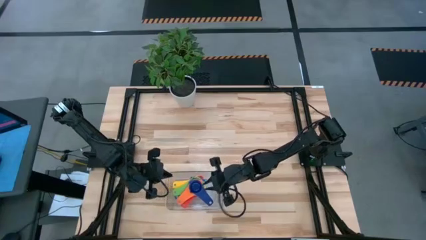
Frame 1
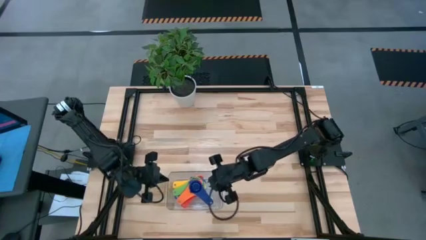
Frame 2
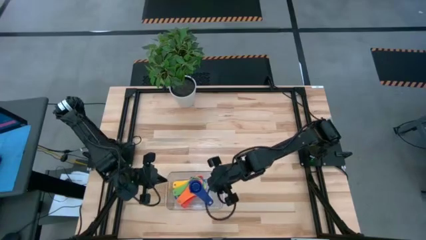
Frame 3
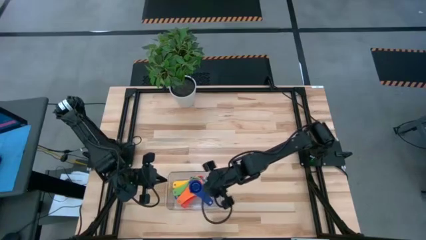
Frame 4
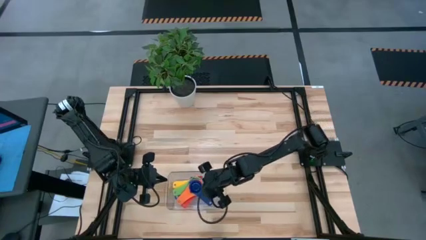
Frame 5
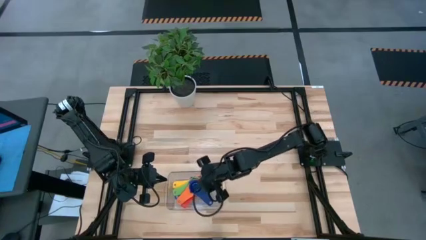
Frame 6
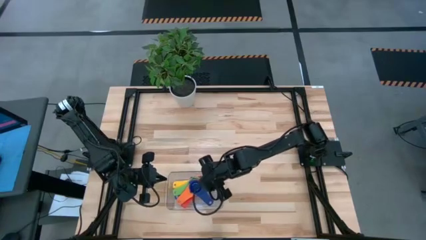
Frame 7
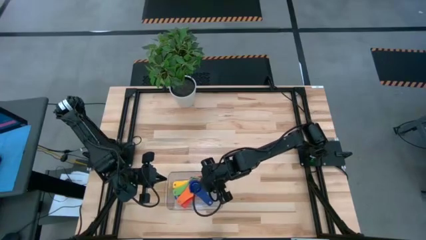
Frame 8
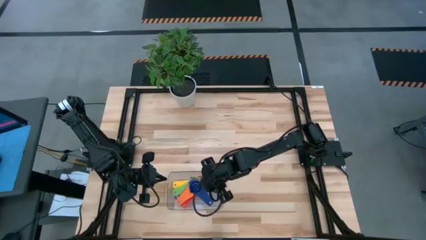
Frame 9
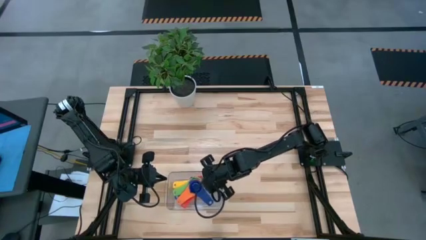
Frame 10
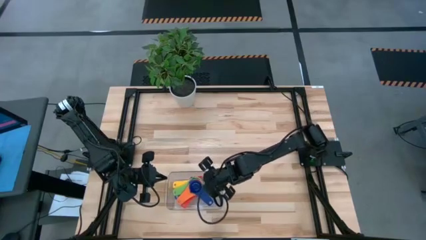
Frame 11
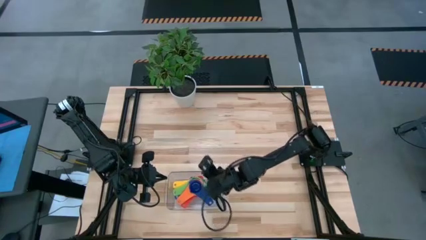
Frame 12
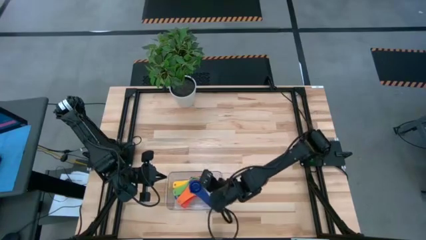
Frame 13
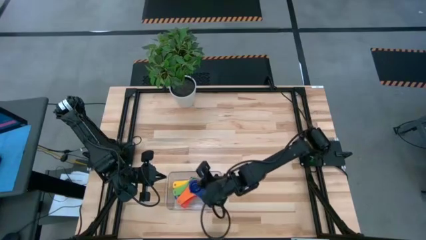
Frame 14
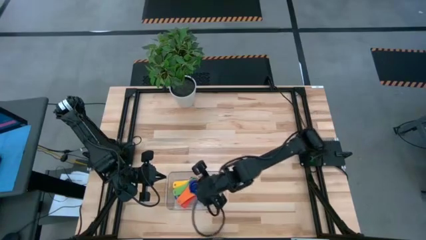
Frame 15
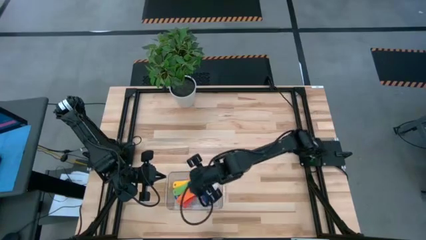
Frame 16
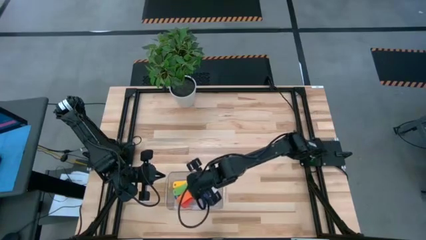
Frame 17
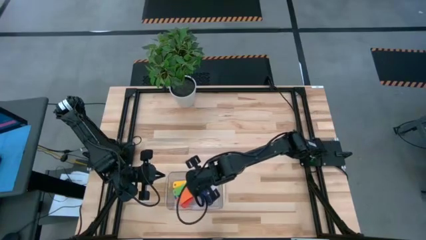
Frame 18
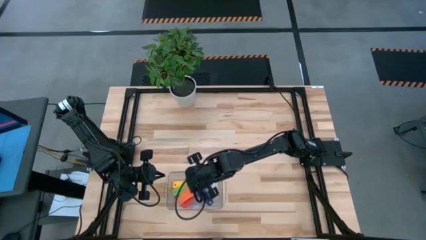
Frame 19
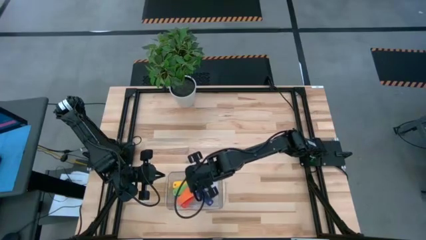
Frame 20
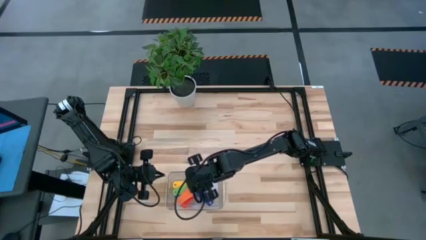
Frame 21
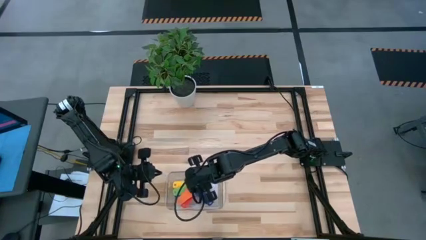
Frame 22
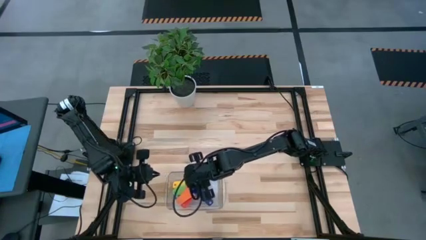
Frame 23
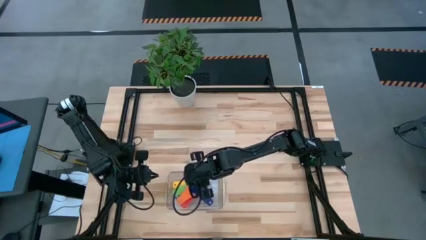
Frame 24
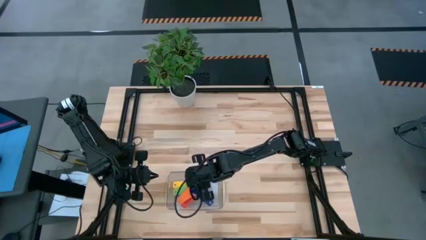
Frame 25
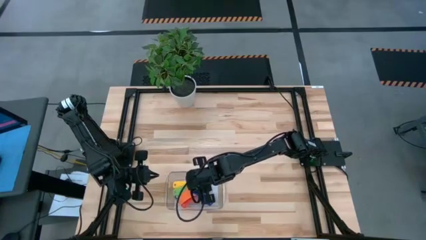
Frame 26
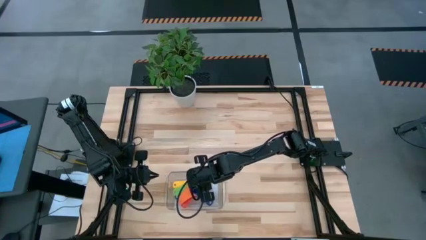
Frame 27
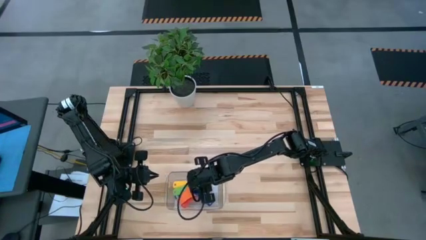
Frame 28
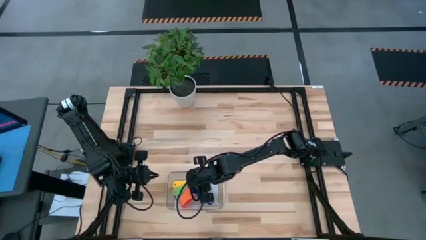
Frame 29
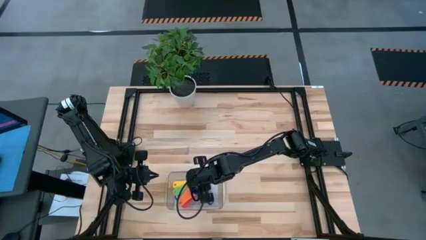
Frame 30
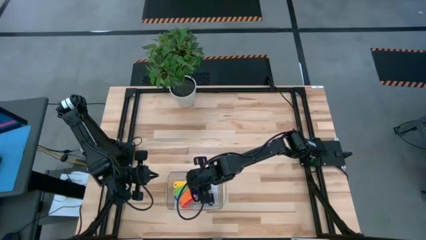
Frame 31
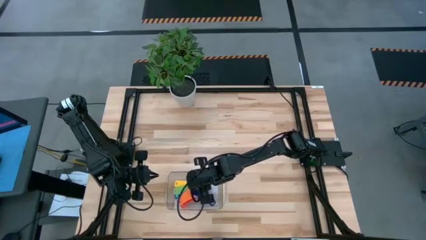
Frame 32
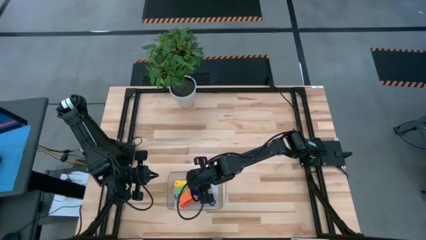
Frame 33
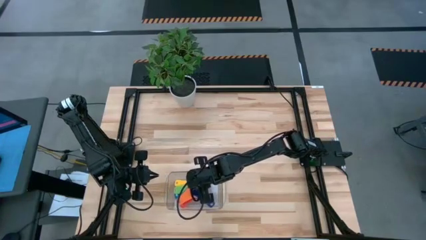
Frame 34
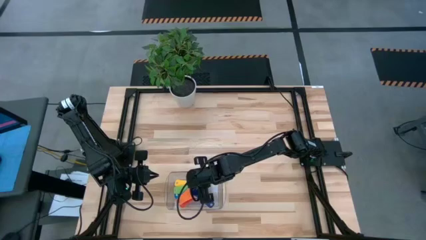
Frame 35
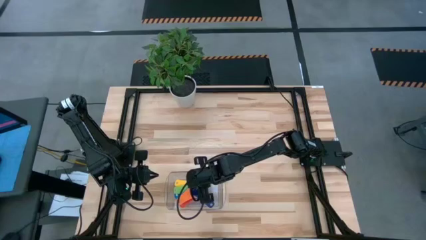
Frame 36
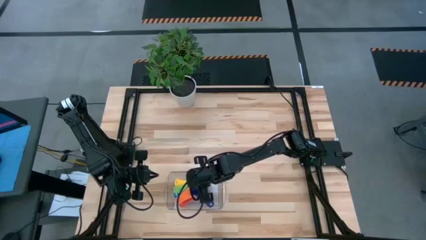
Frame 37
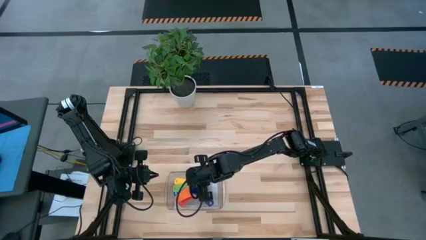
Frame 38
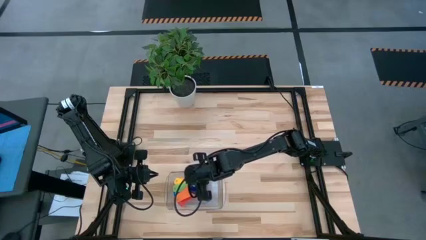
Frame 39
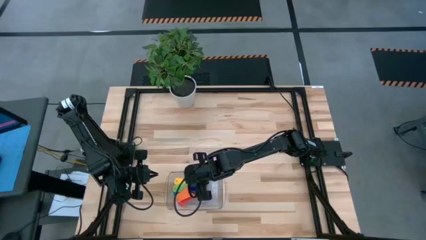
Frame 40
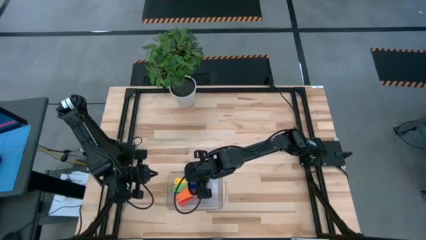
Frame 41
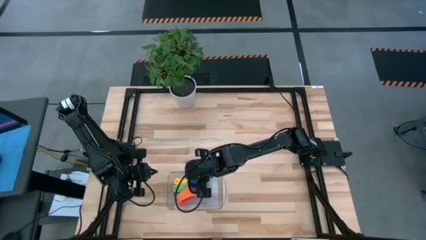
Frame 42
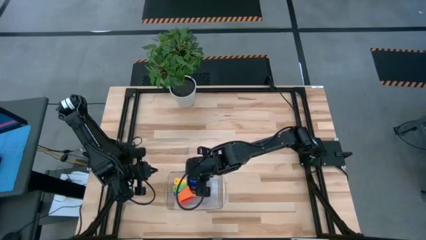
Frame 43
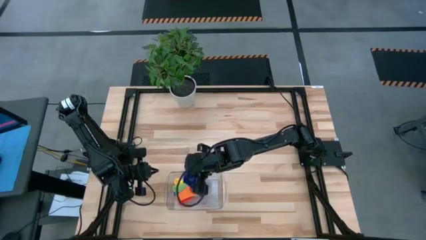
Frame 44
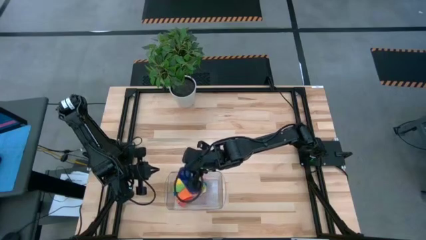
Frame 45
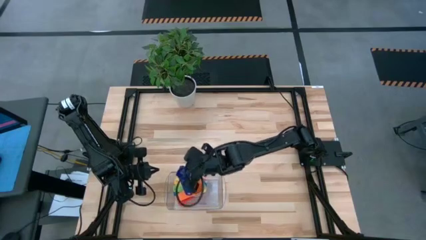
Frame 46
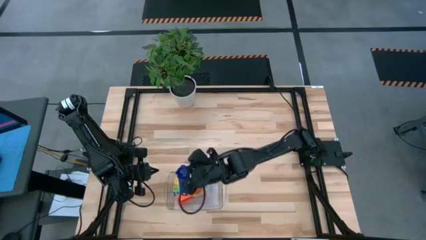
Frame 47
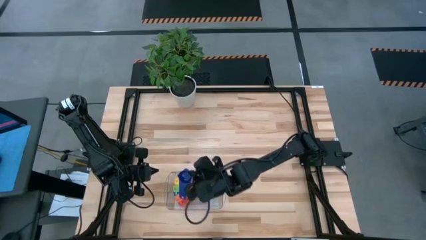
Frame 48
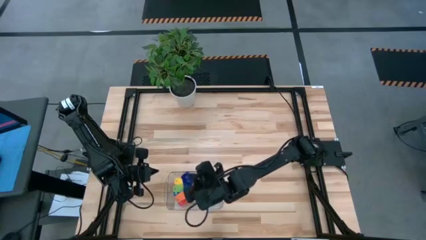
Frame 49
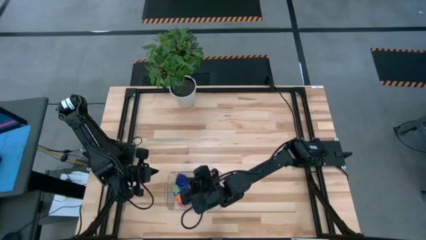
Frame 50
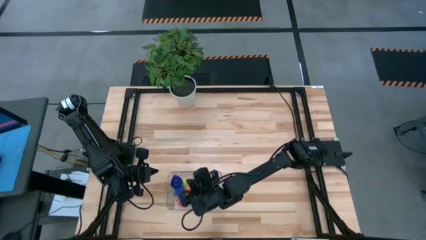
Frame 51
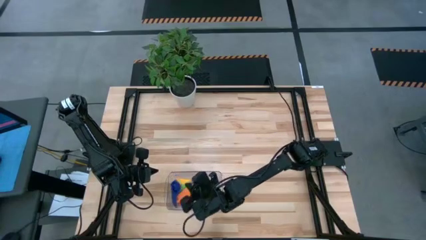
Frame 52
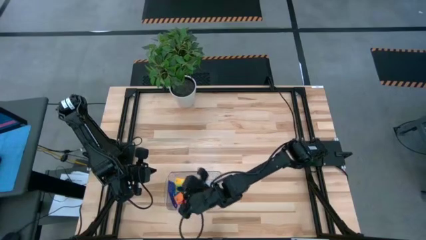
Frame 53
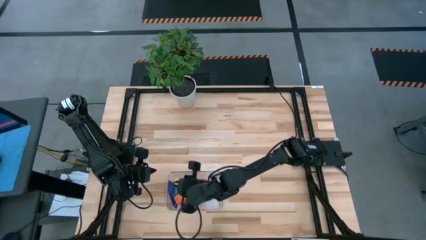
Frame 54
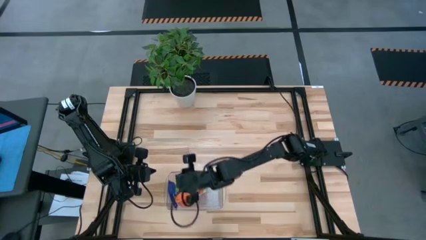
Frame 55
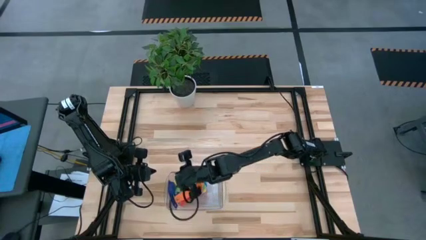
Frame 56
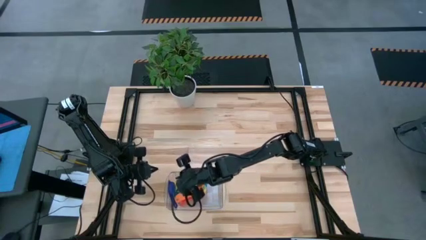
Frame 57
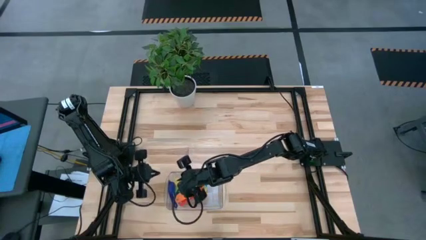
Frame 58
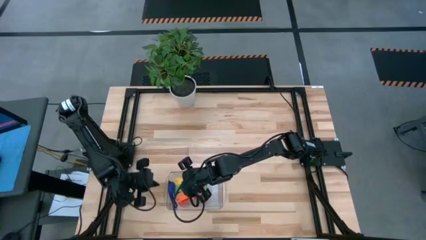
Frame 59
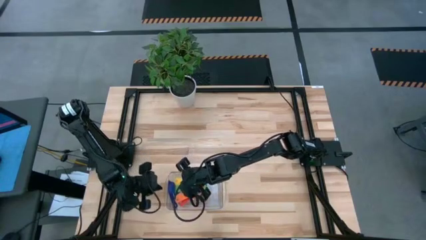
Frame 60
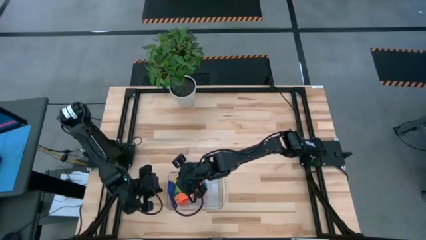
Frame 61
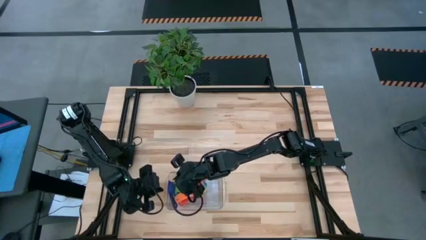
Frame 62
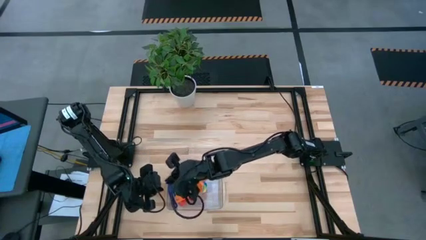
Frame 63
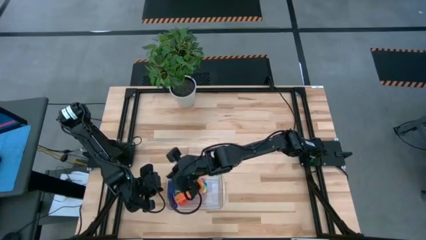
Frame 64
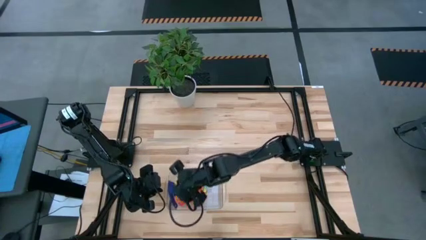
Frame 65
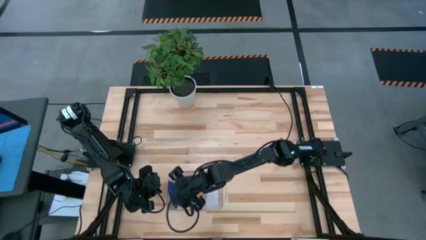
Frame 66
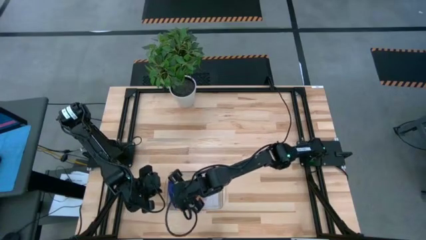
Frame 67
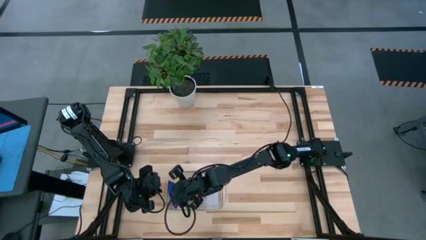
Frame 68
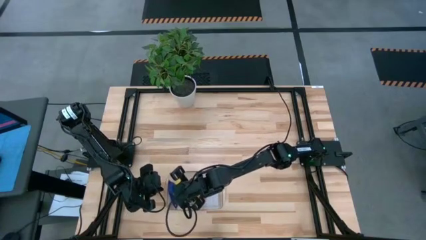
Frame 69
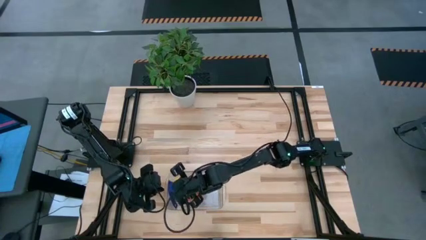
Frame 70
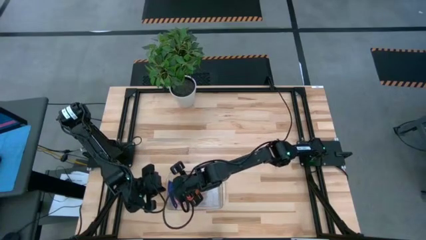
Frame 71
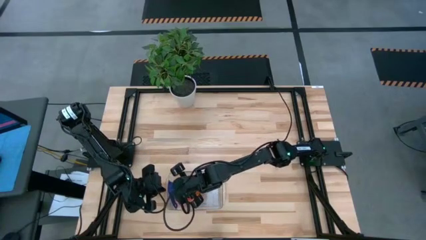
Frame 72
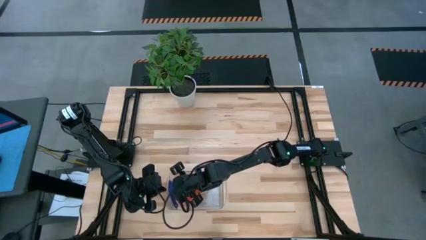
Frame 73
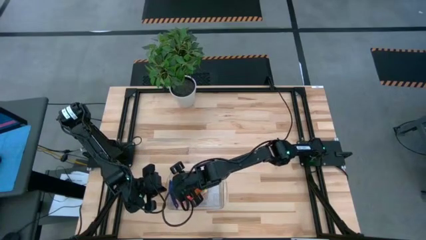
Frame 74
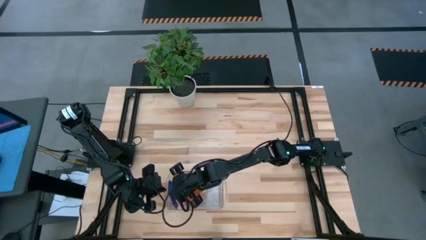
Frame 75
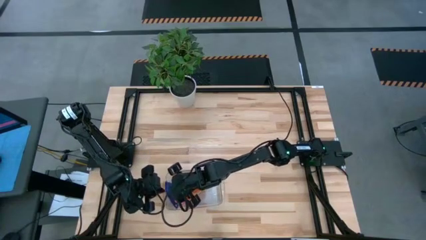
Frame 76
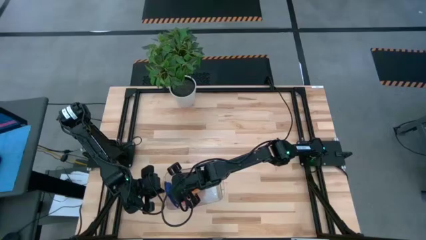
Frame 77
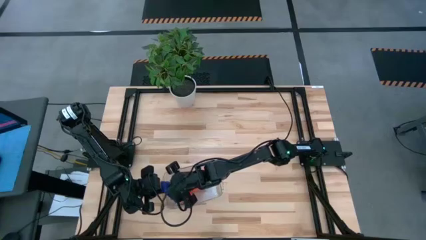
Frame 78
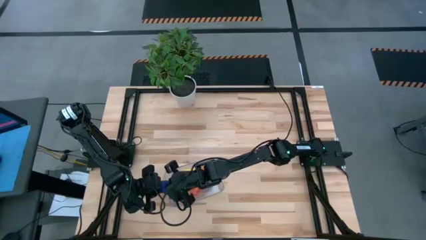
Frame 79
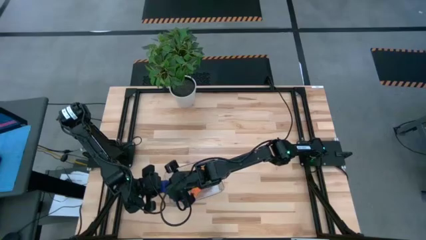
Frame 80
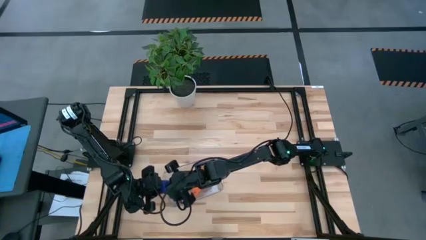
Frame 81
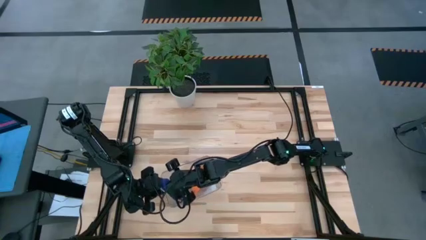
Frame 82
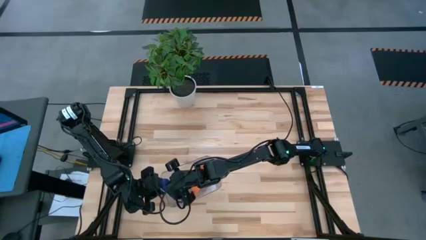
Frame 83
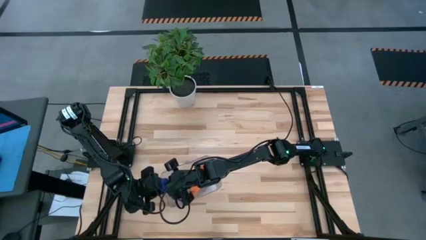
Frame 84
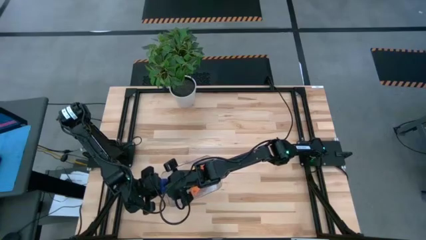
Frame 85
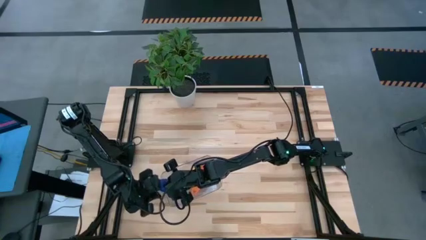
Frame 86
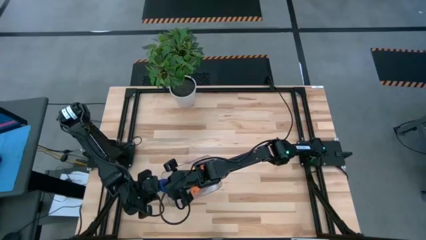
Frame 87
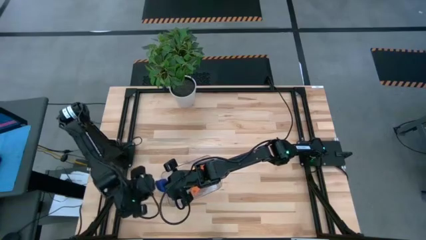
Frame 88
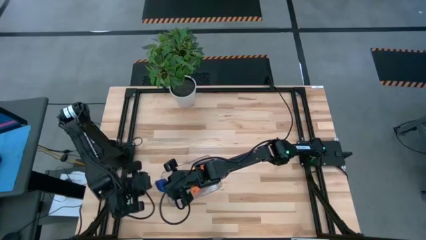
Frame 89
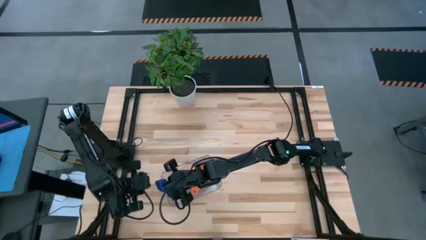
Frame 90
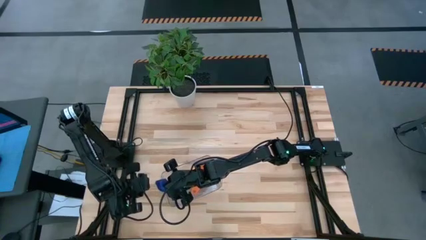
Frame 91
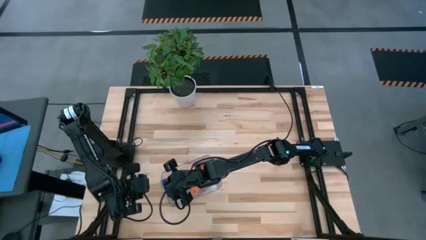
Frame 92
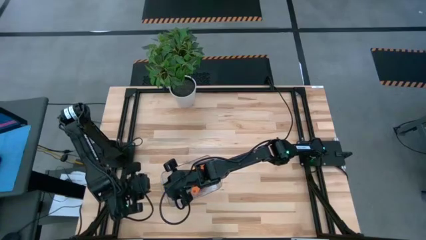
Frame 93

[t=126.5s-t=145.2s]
Task: Nest measuring cups in basket
Adjust the dark blue measuring cup on the transparent bin
